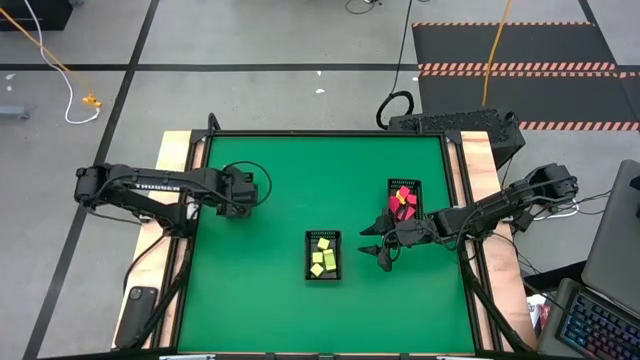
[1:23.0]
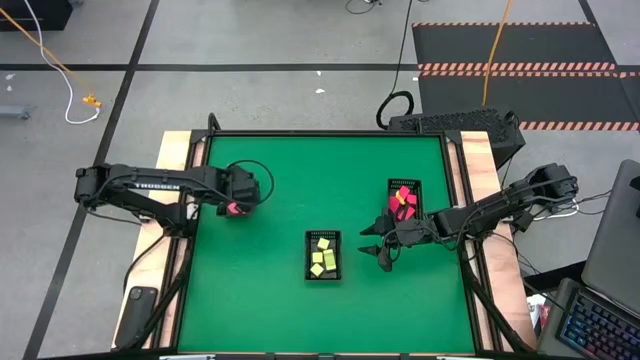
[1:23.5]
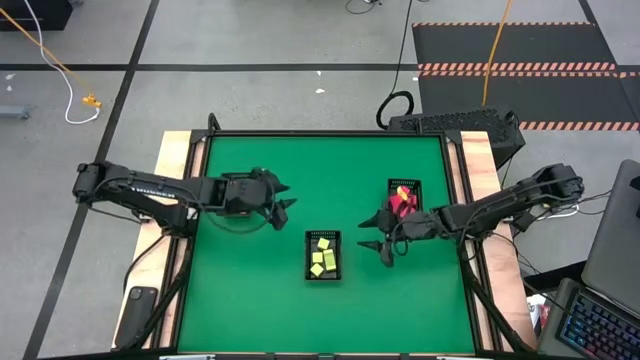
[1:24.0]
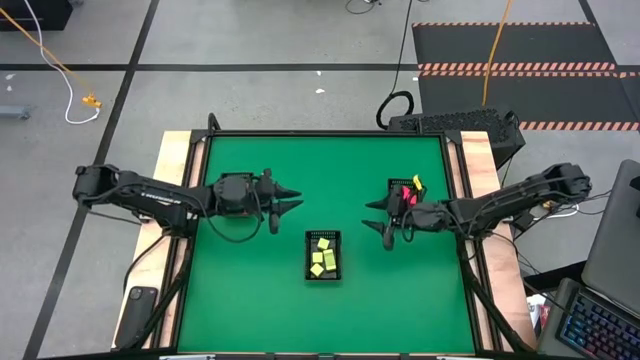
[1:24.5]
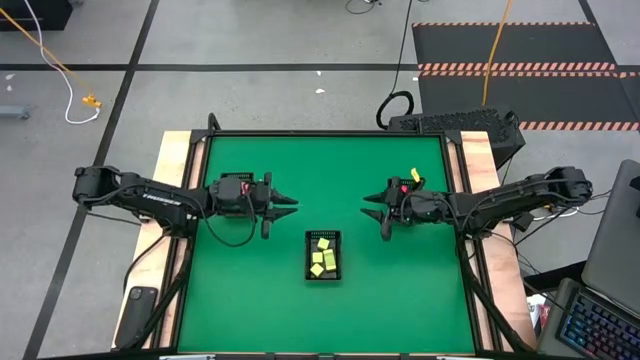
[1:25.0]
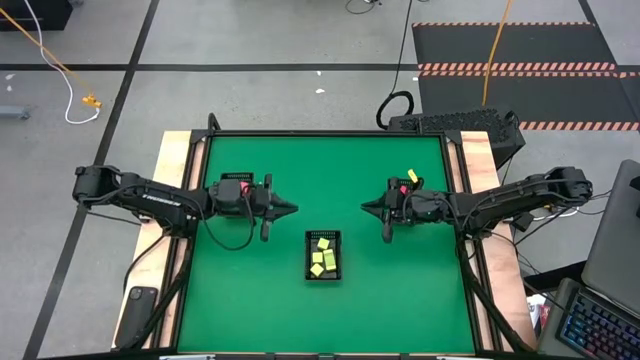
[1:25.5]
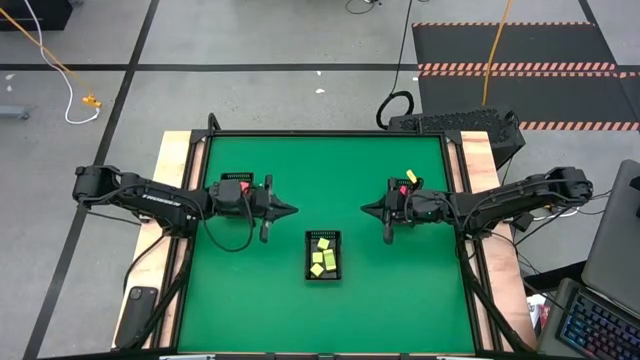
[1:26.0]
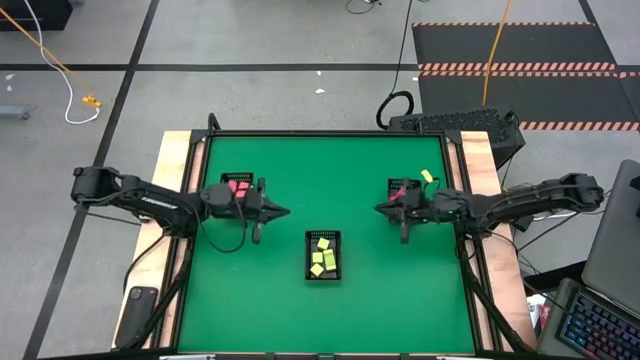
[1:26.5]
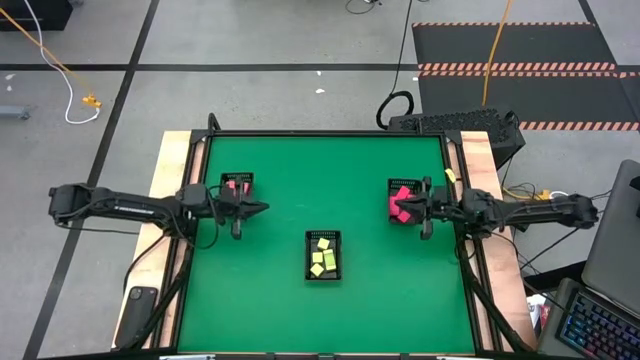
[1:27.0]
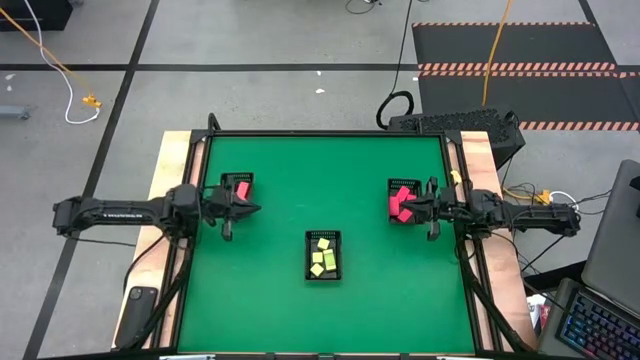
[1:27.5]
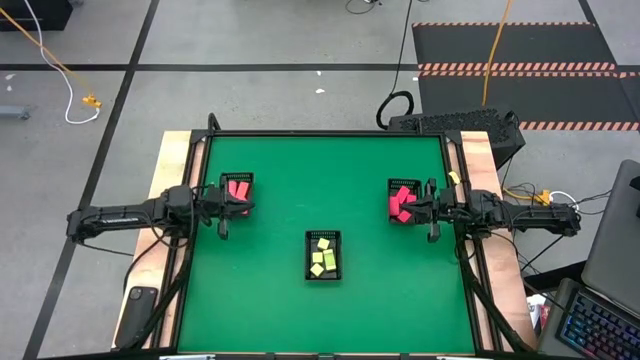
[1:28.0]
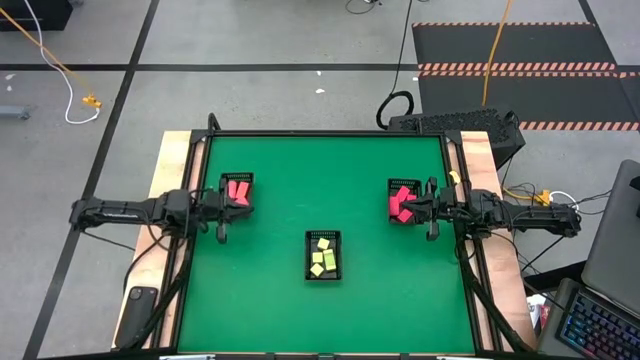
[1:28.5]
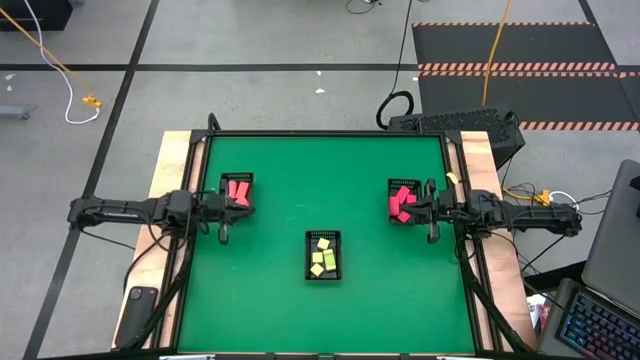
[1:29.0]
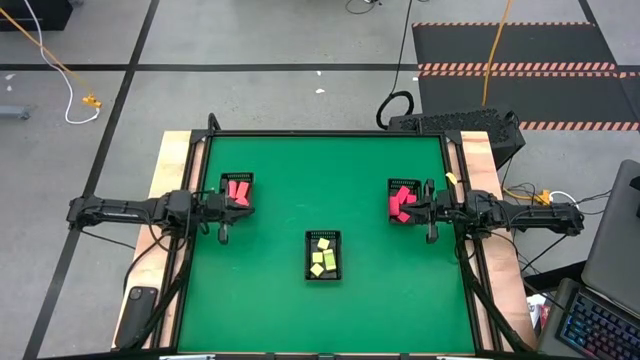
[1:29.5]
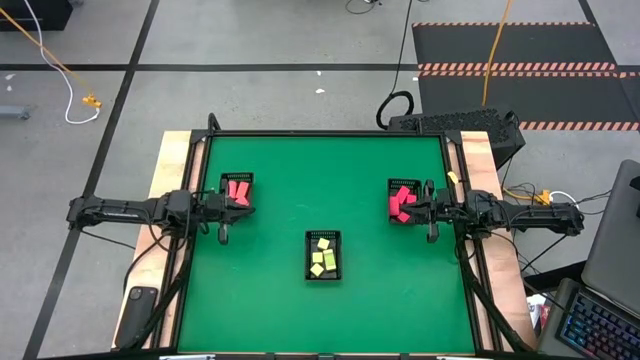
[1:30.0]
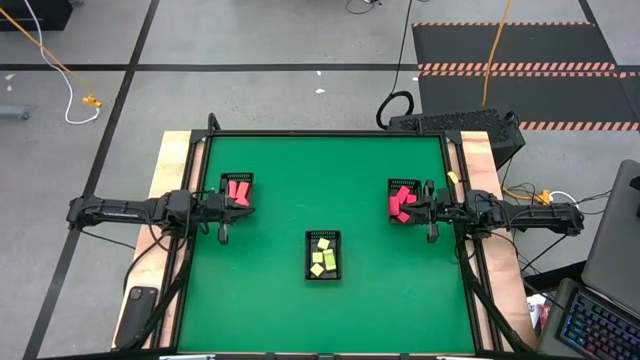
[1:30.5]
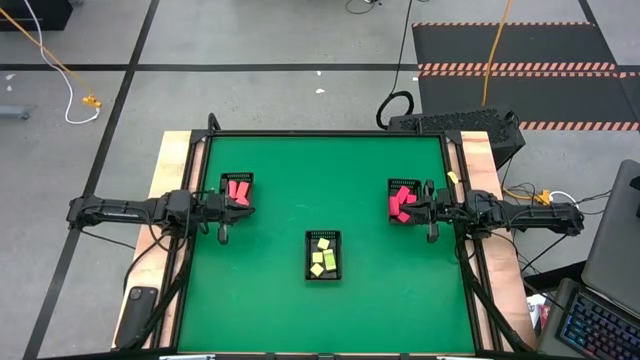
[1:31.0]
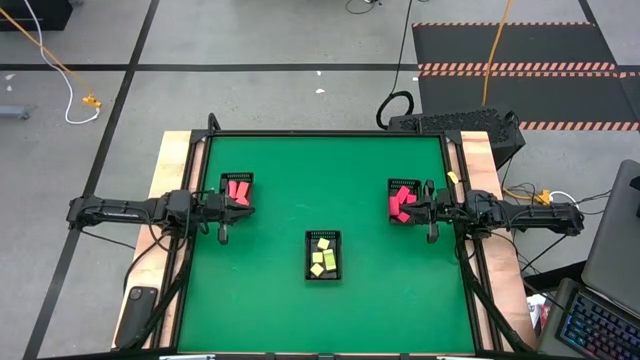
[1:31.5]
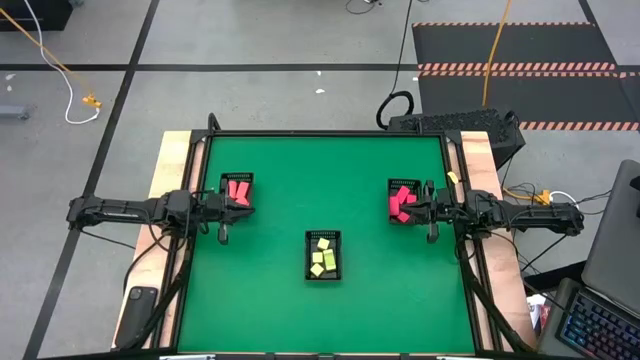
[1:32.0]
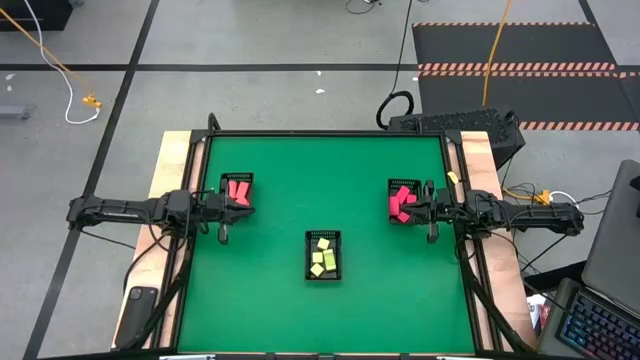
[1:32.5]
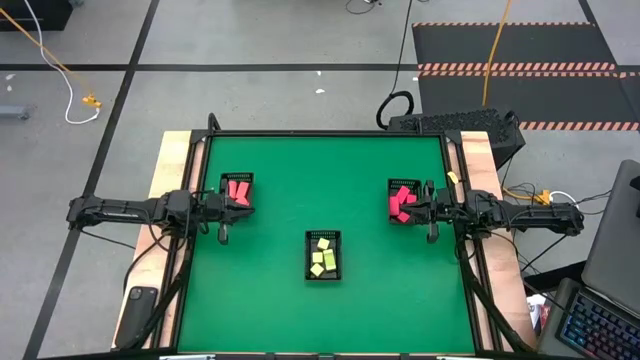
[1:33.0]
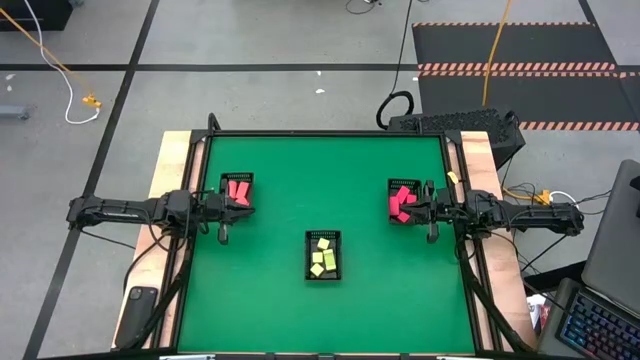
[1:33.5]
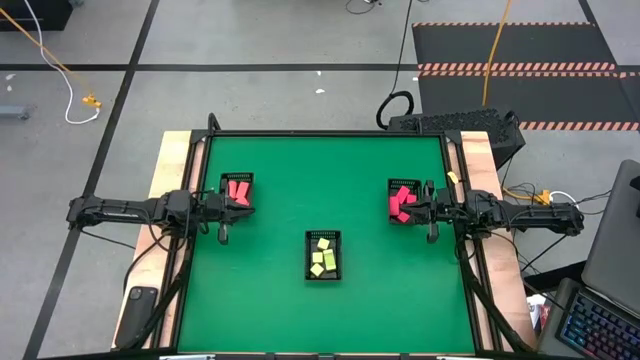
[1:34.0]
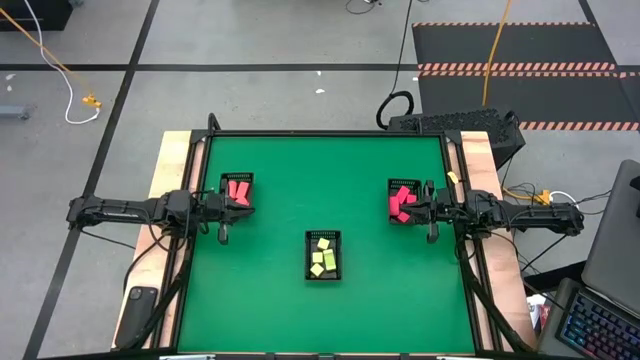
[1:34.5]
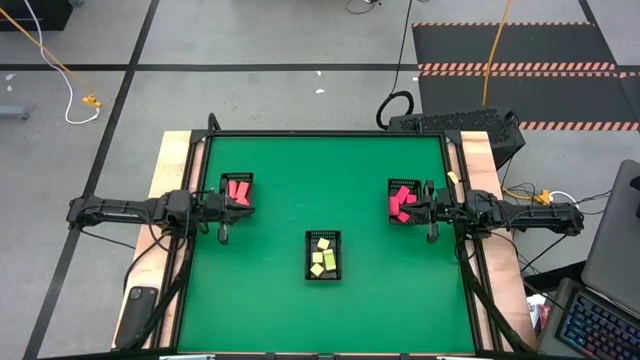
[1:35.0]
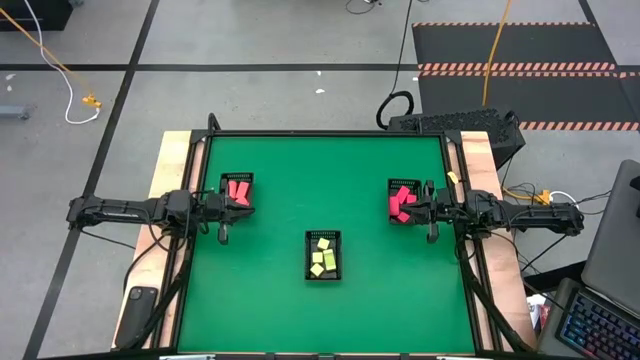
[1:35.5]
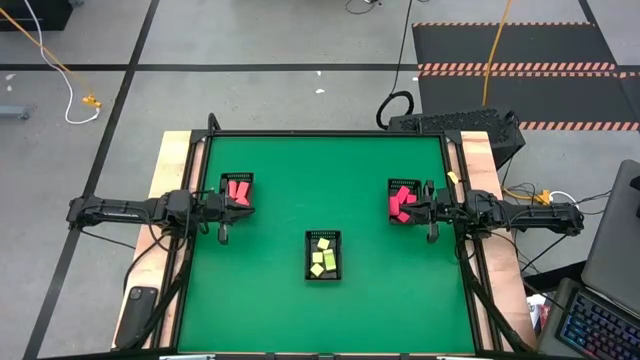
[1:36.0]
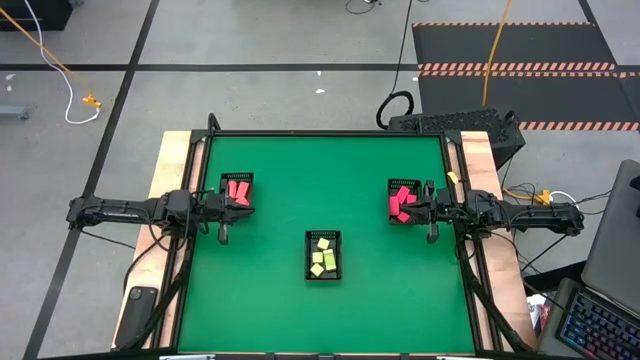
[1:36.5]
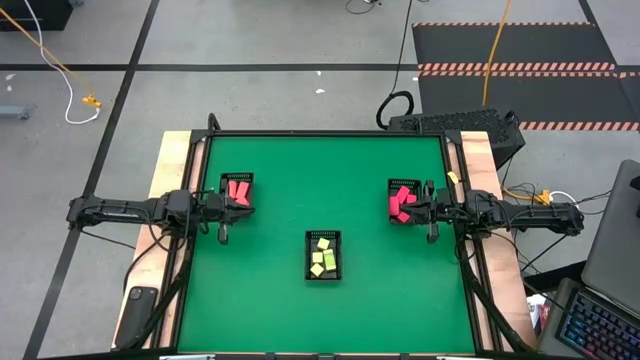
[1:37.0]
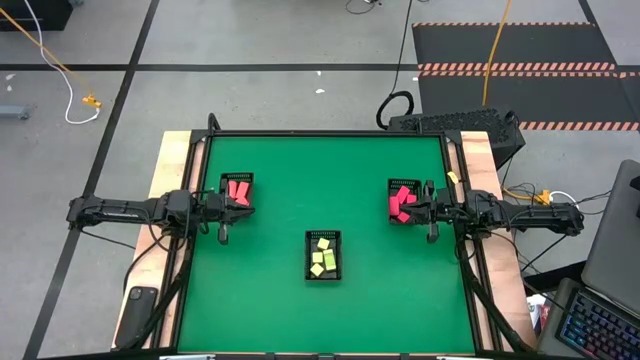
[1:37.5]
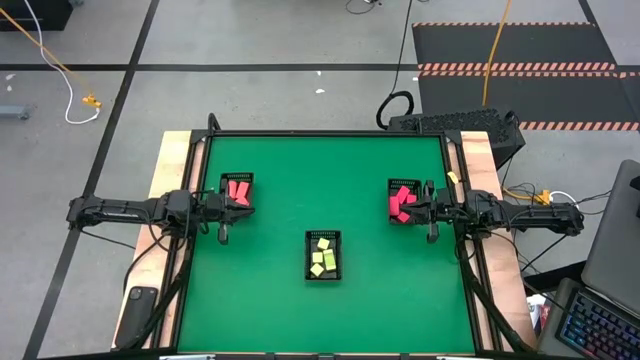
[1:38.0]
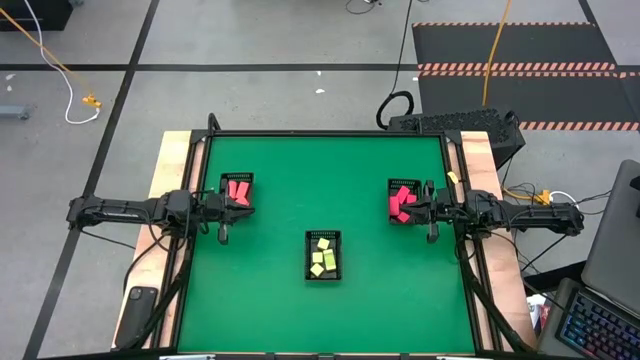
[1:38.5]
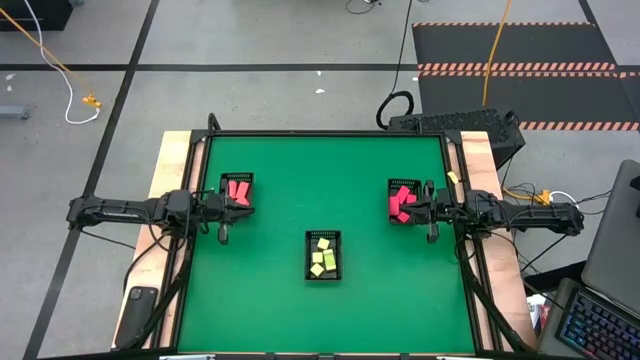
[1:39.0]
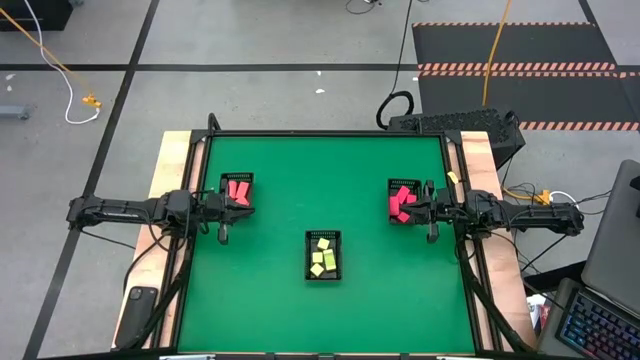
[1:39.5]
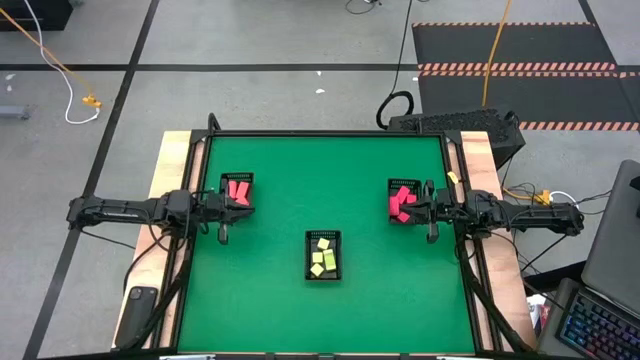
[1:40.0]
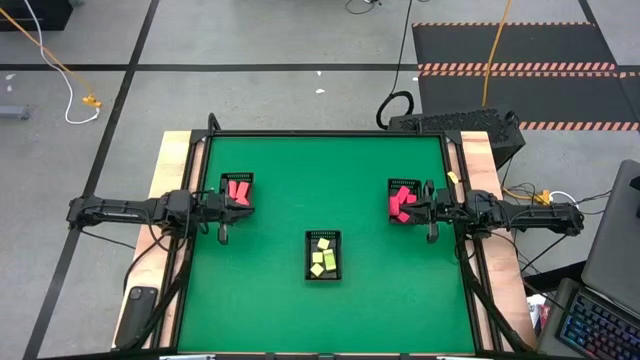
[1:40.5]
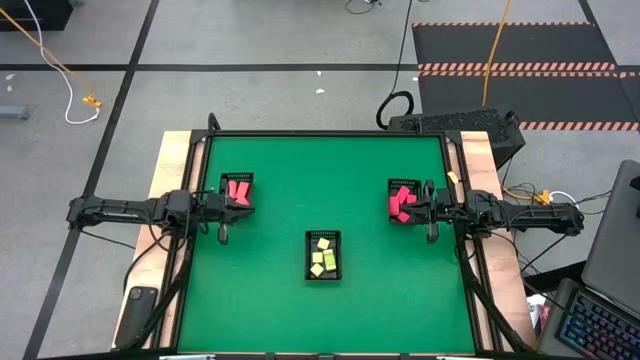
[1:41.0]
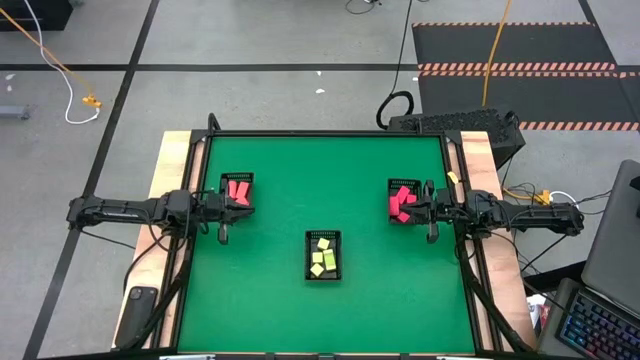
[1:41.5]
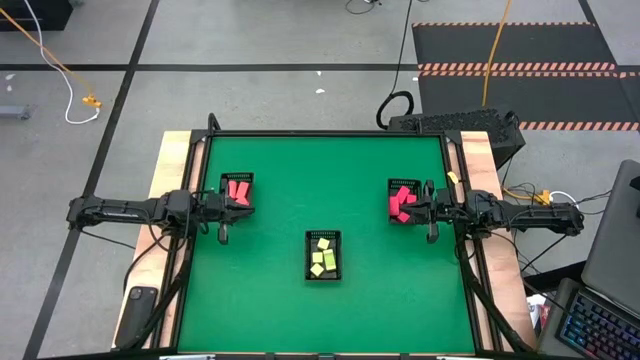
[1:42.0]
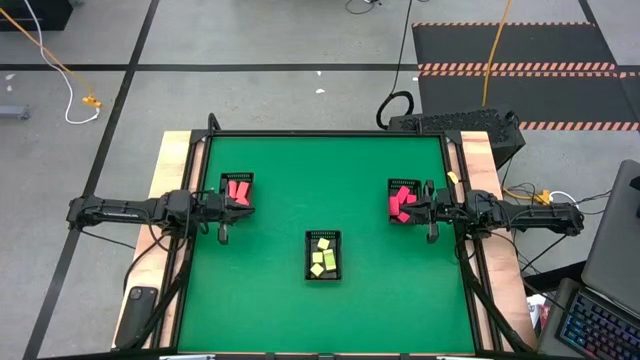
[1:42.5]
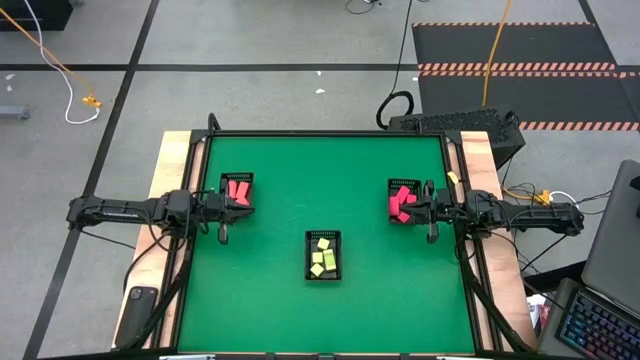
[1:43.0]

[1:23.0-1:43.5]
Task: Sort & place blocks by color
Return to Home Position
